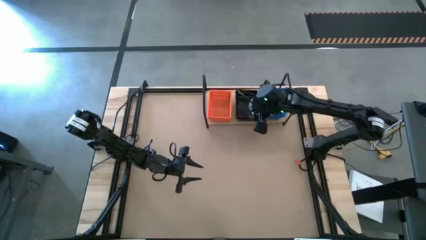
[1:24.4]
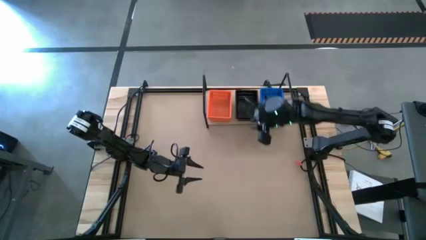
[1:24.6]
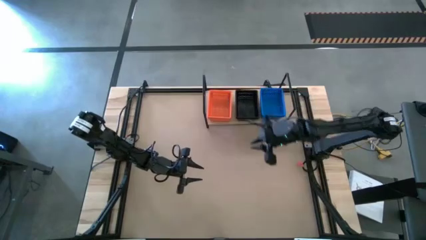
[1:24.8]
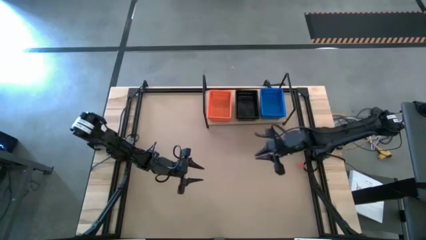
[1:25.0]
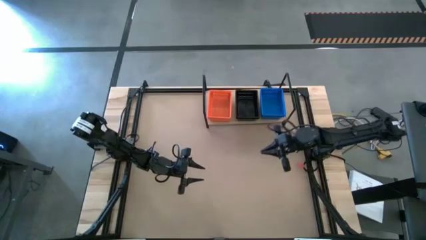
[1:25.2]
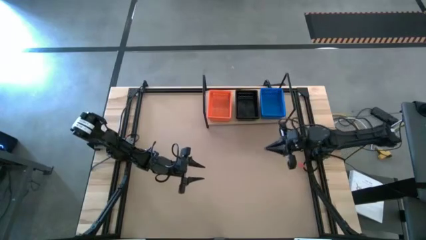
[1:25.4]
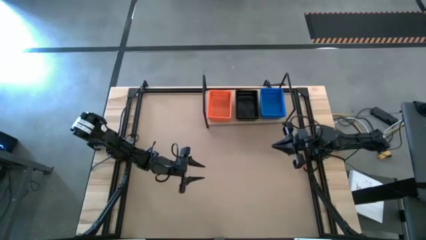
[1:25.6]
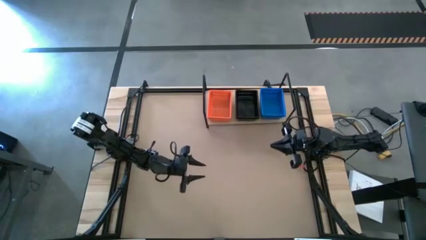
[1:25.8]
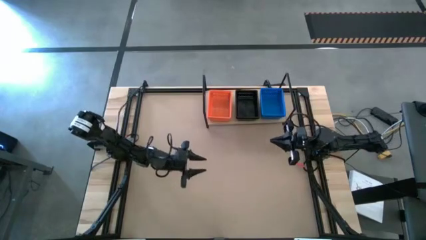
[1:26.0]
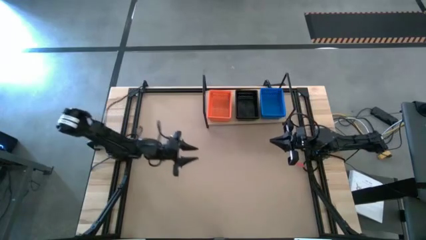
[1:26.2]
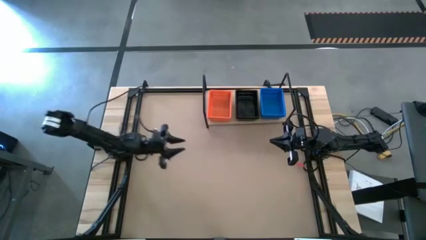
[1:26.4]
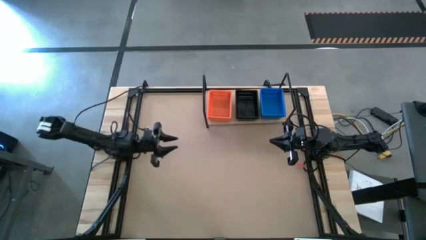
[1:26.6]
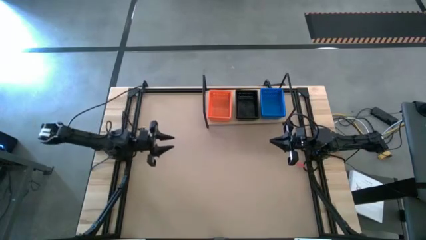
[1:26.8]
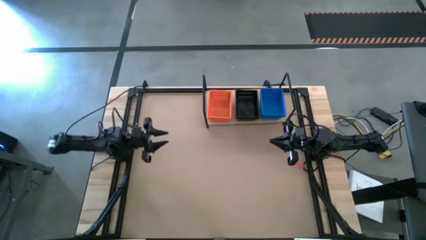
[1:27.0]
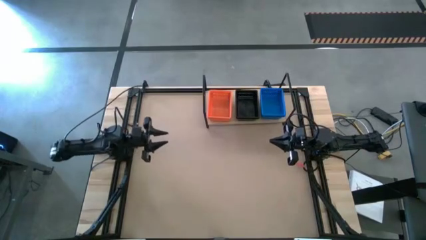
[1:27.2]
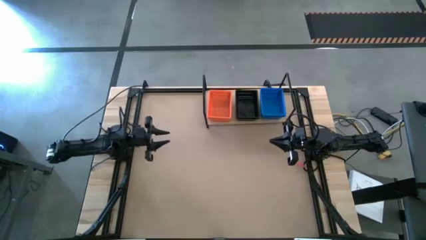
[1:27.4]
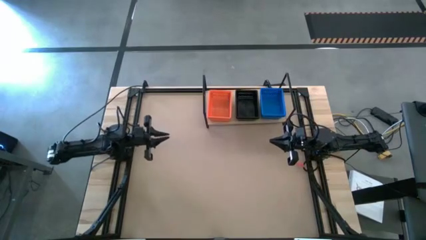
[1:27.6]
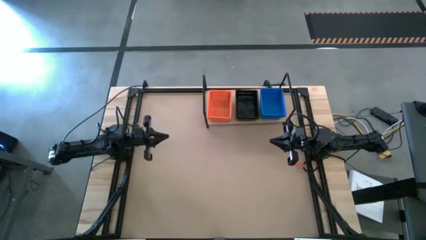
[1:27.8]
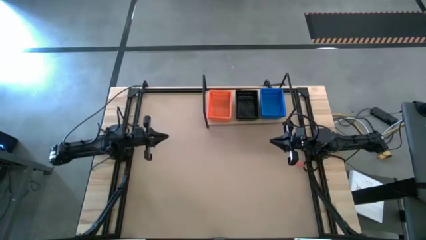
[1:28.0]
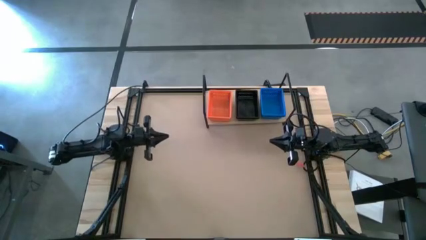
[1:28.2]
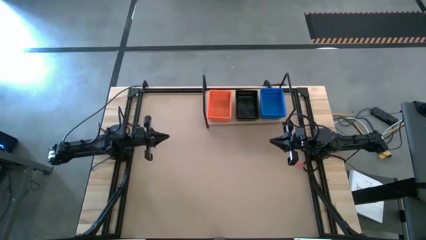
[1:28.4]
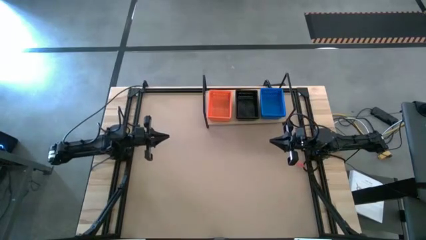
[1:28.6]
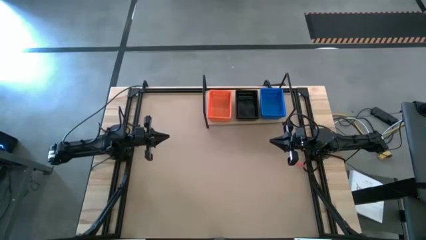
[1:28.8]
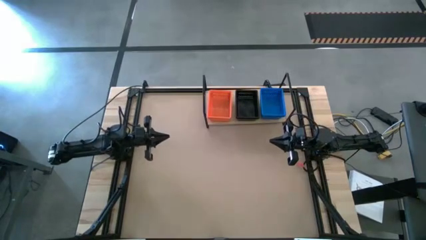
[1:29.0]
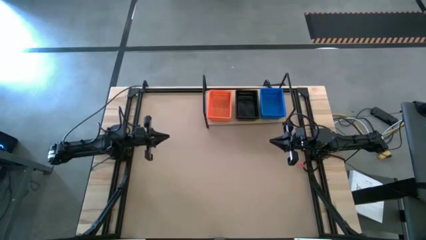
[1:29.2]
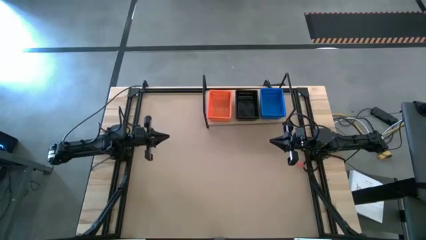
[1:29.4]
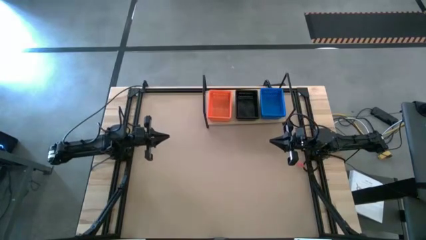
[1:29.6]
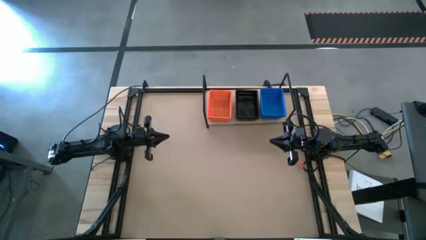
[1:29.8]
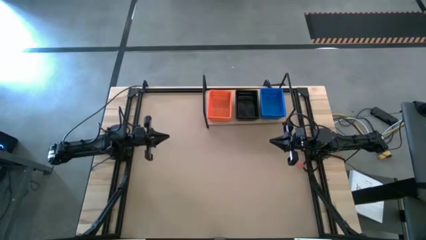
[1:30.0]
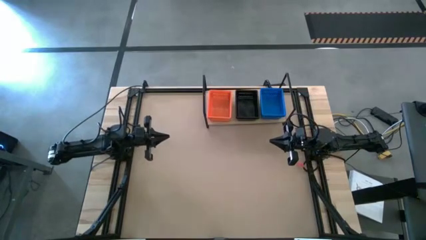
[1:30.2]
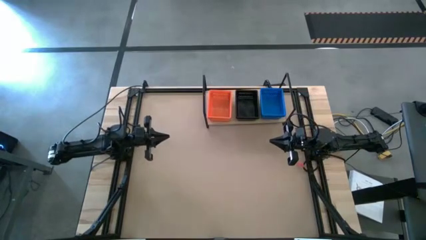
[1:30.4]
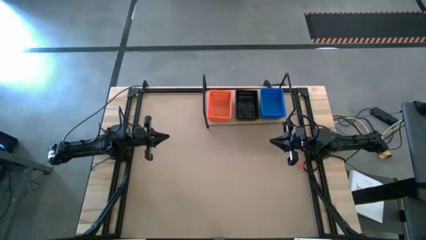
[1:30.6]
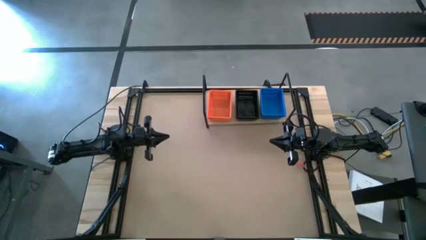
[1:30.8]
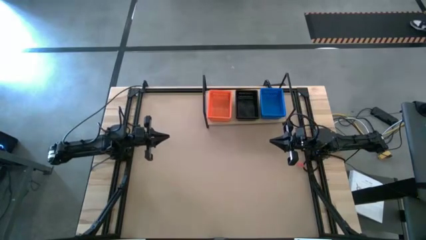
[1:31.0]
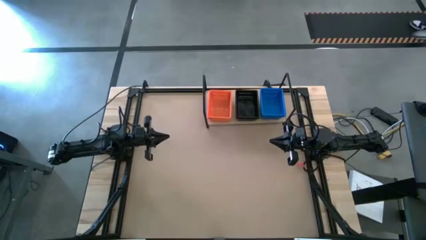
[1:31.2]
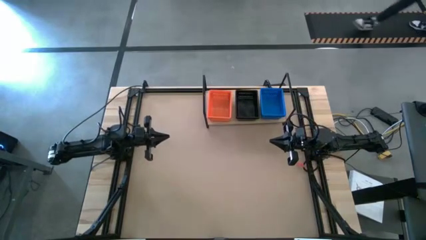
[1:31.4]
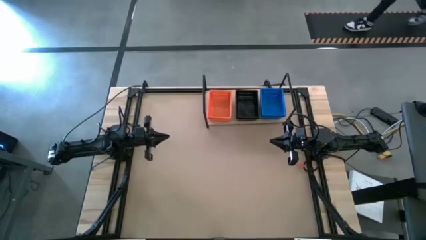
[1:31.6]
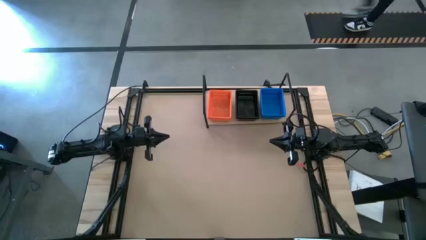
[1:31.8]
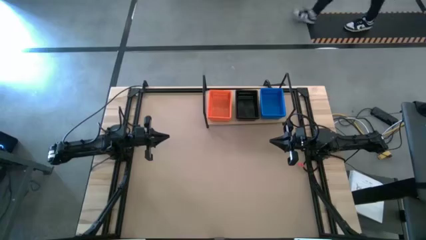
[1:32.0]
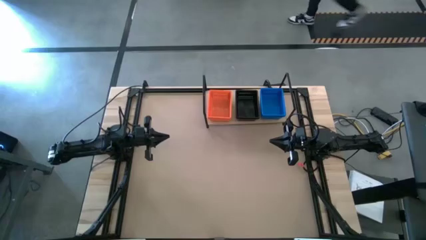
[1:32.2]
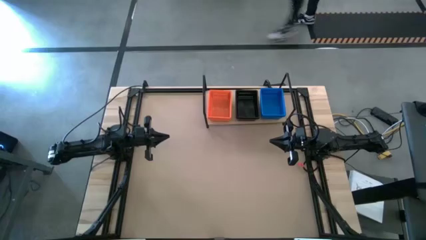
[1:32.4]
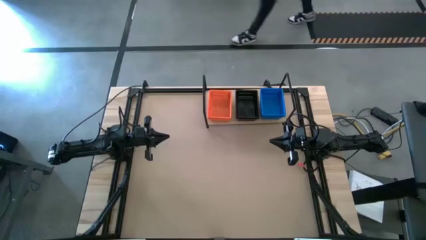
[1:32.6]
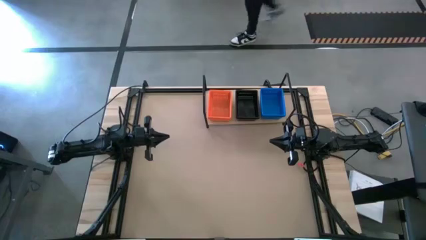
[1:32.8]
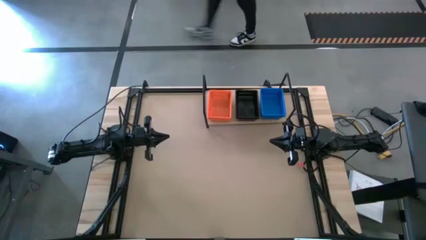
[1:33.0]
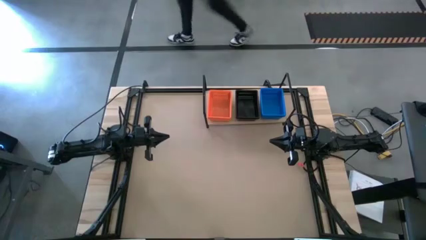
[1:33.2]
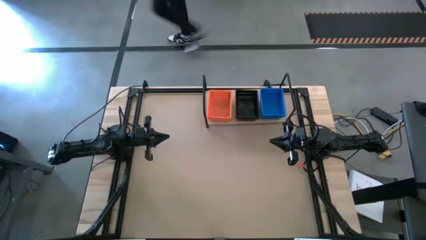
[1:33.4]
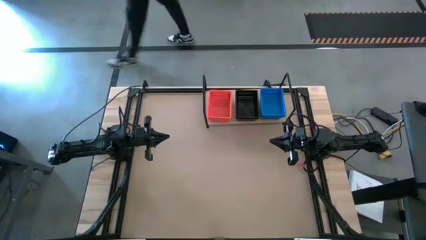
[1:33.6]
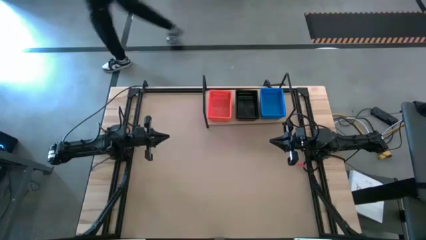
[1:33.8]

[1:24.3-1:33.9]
Task: Stack baskets on shelf by color
Return to Home Position

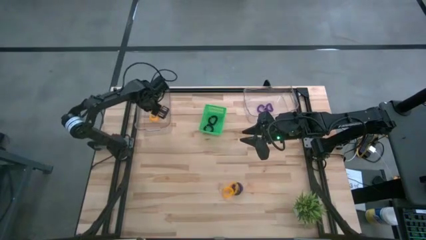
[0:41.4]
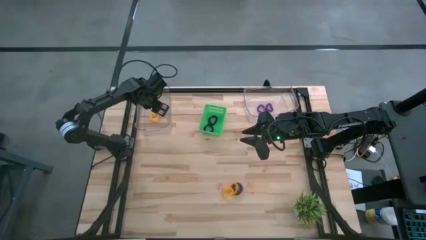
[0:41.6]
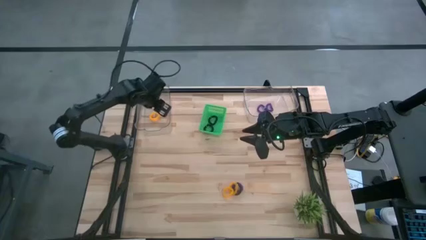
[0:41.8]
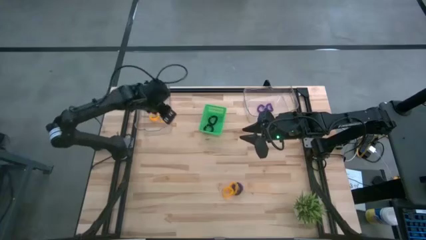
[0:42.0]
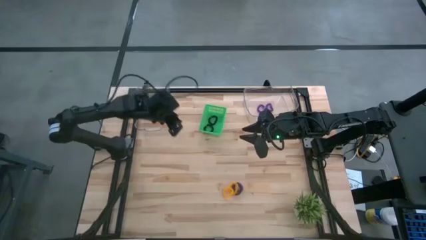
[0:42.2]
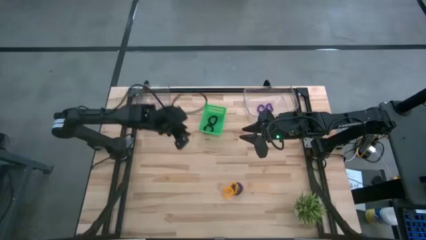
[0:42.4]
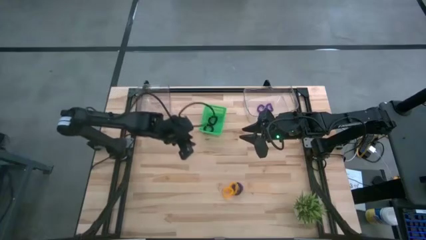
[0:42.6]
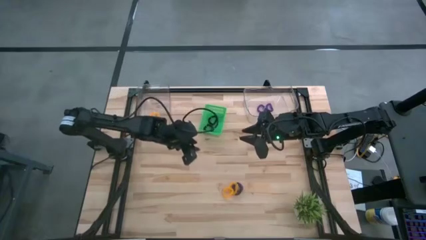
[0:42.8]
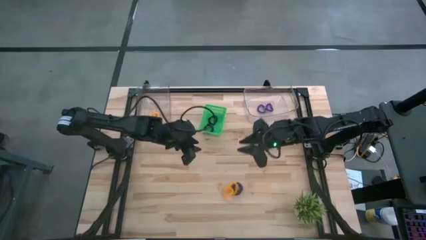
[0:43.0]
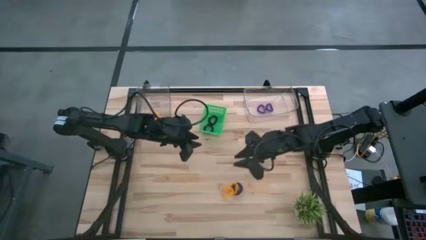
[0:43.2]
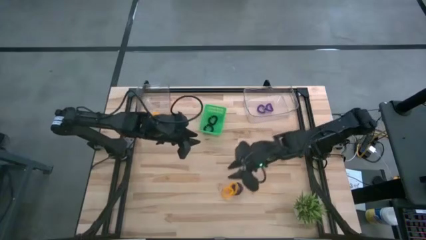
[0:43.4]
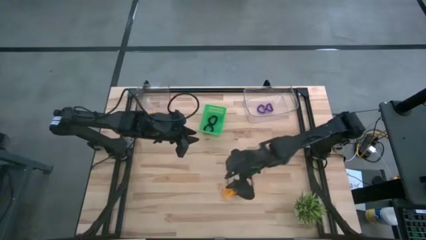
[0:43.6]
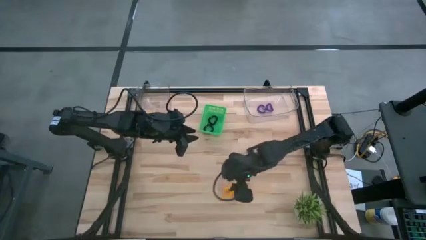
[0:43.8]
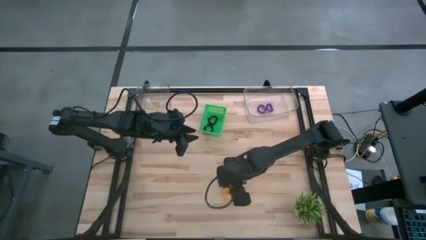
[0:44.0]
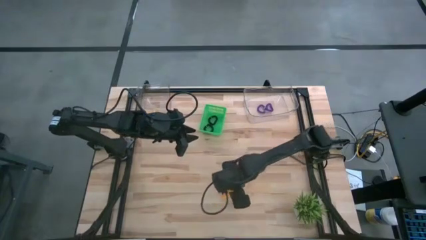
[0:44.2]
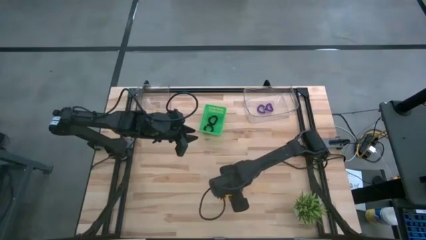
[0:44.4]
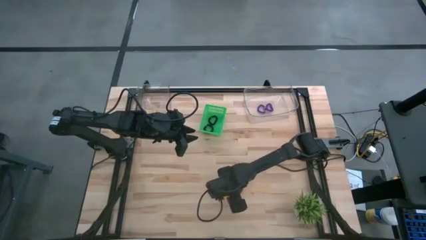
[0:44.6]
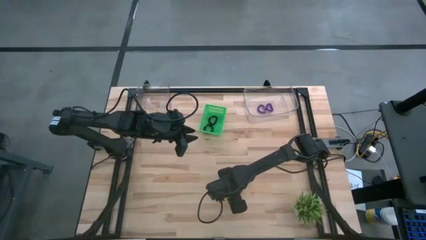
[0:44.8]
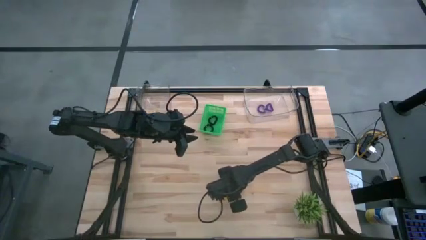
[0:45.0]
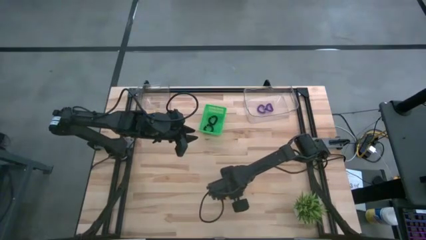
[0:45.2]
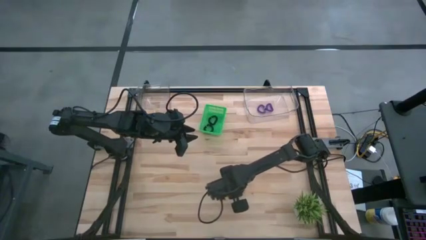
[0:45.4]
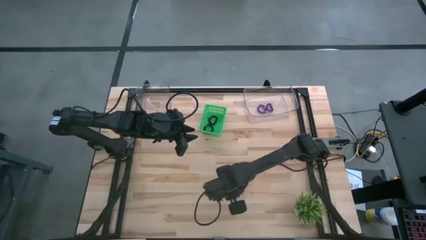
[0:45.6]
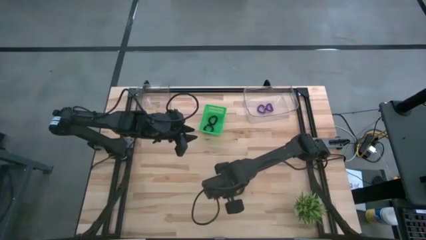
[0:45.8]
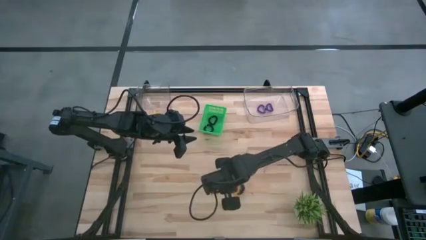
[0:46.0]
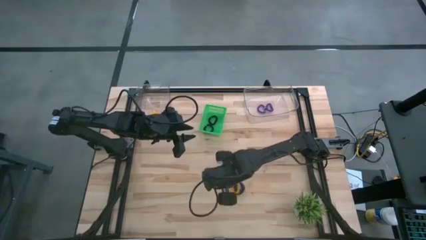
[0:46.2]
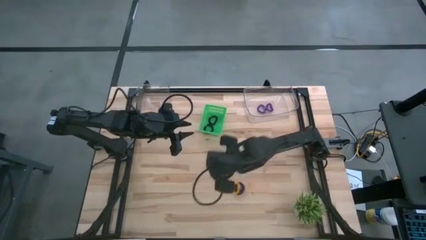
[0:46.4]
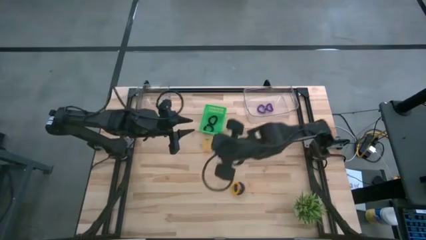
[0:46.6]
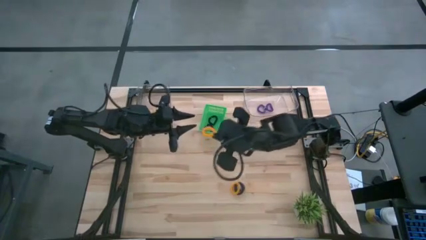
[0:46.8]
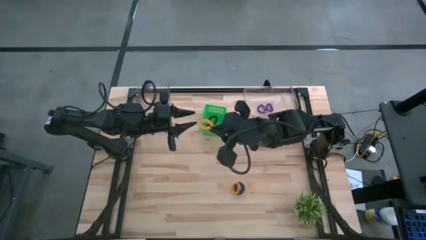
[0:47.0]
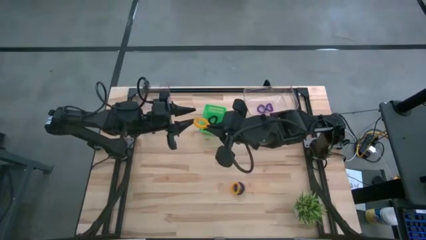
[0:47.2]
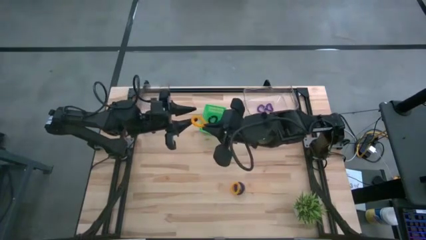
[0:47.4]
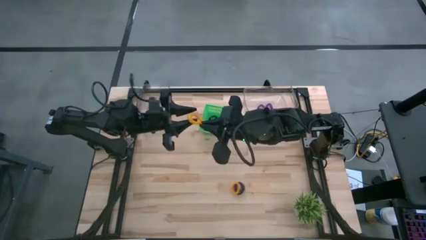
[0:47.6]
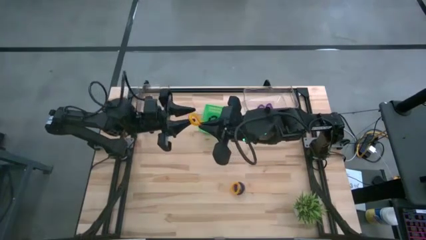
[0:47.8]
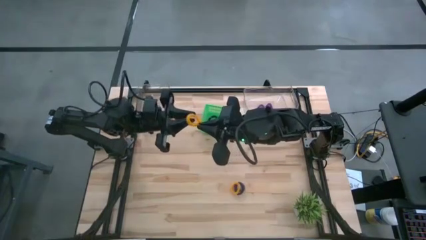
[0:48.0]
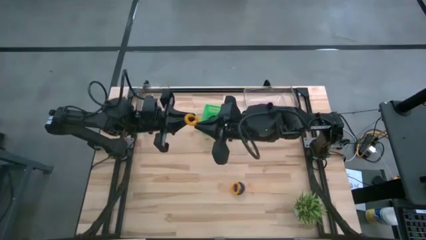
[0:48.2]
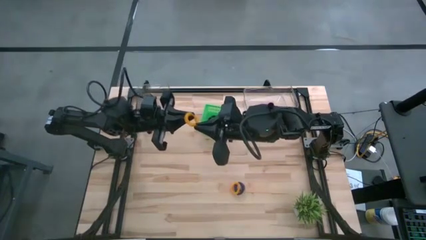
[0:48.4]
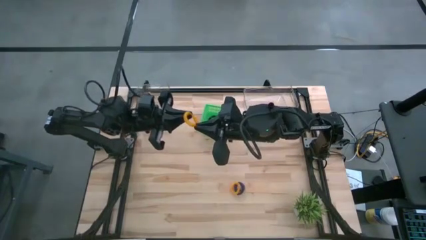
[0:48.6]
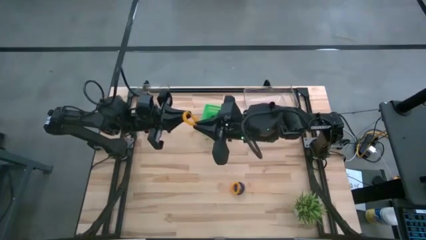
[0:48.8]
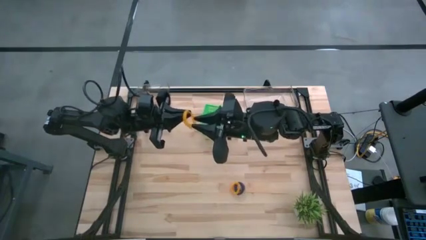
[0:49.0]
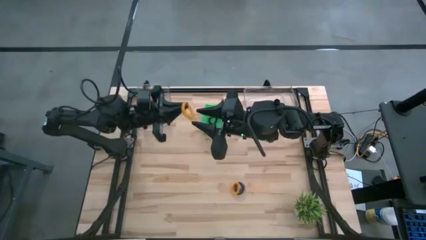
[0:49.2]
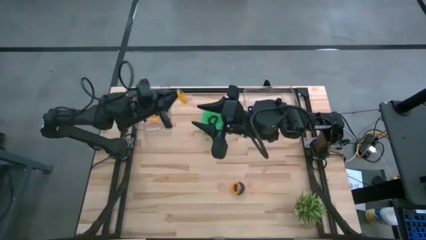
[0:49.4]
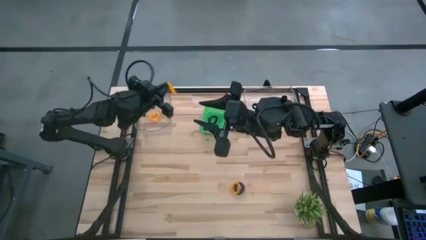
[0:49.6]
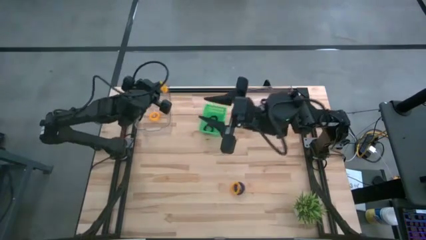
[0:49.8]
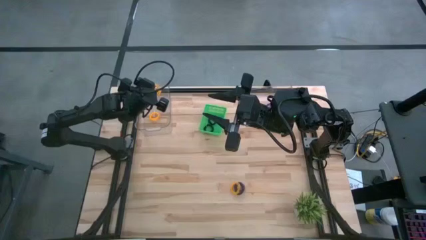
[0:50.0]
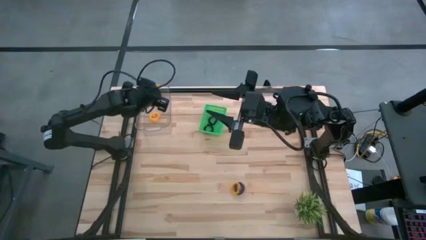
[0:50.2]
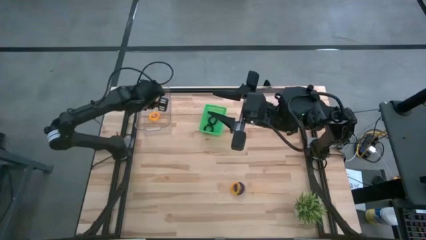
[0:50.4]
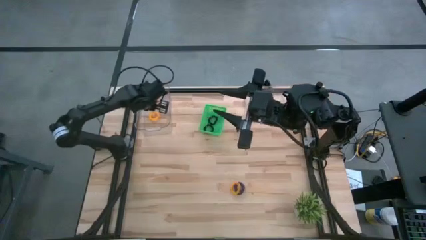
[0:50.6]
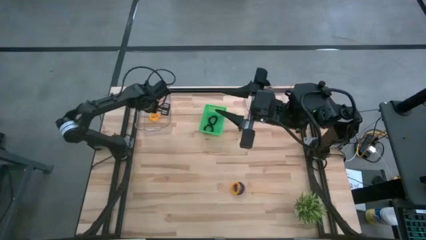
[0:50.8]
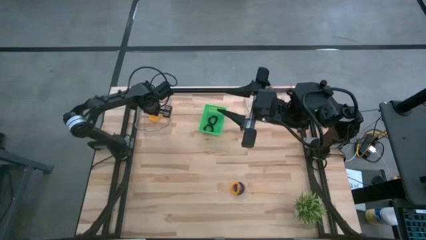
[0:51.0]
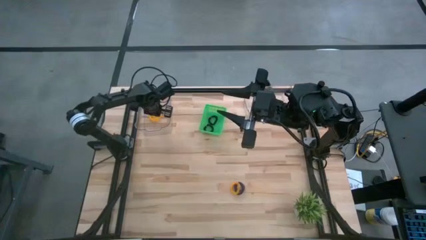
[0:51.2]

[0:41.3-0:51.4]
Task: Sort spring keychains
Put the yellow spring keychain into the left transparent bin
